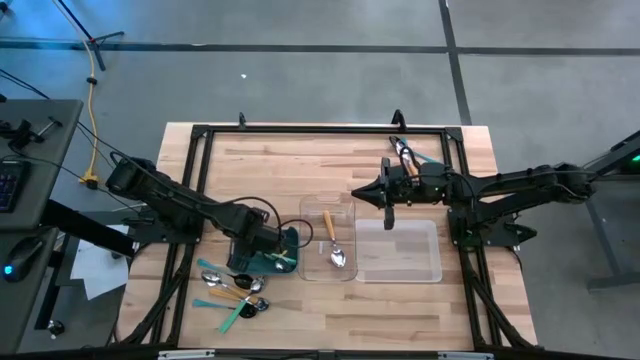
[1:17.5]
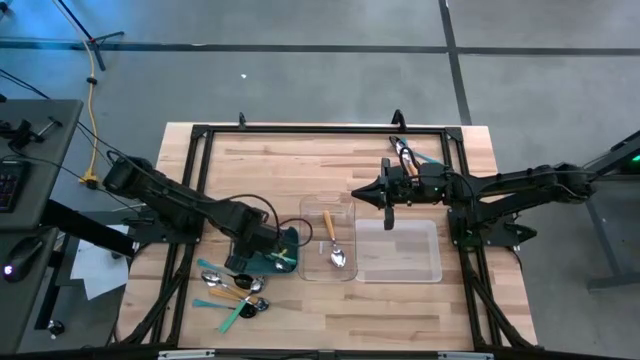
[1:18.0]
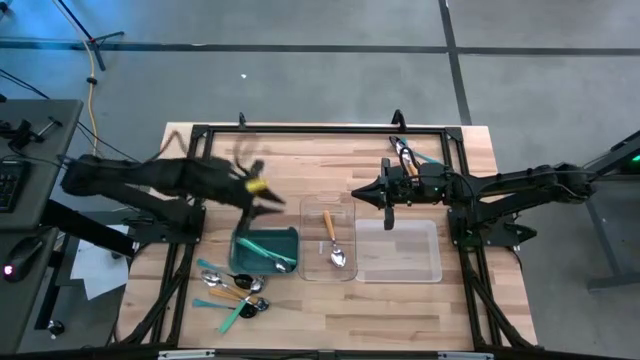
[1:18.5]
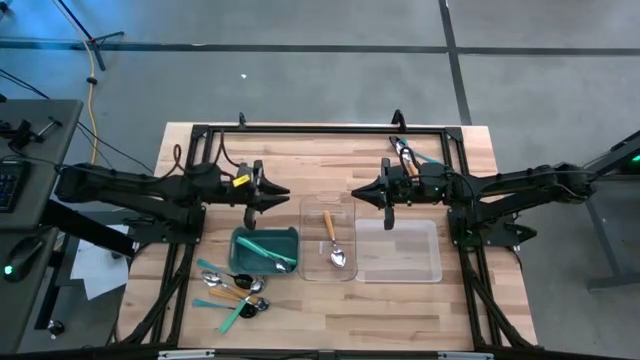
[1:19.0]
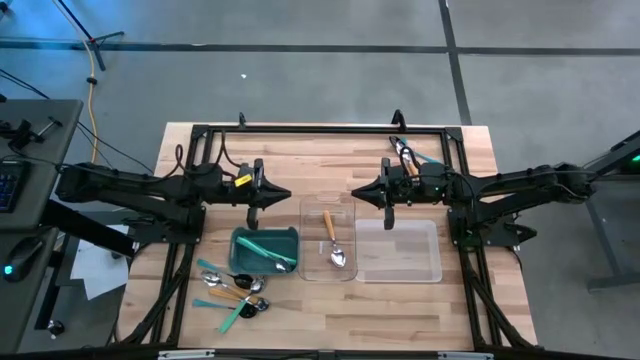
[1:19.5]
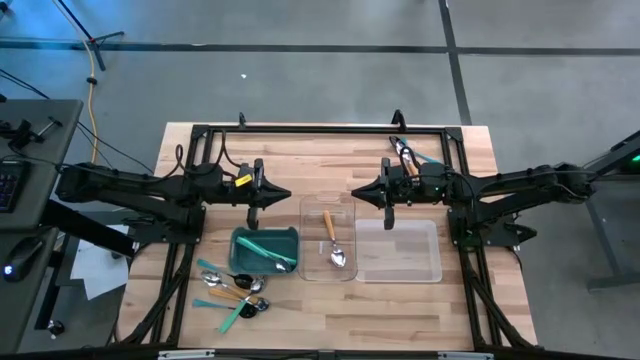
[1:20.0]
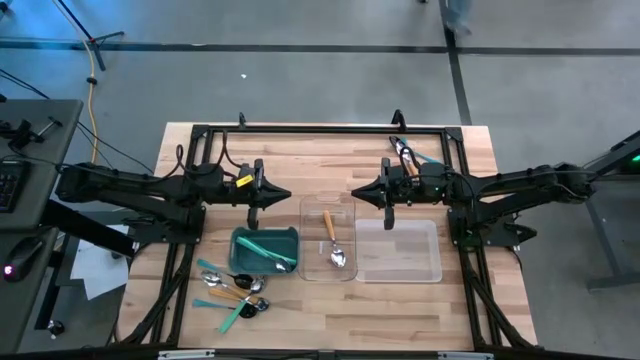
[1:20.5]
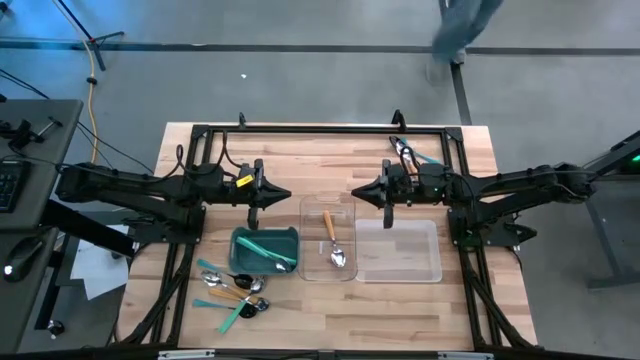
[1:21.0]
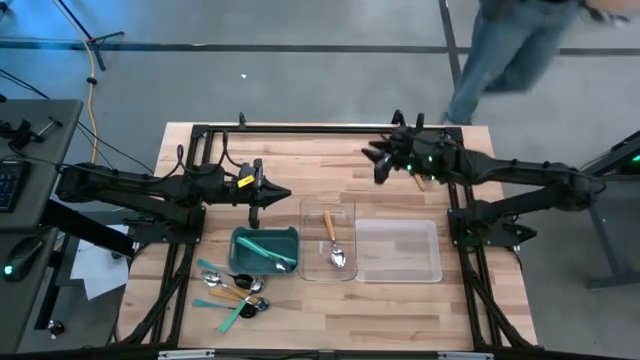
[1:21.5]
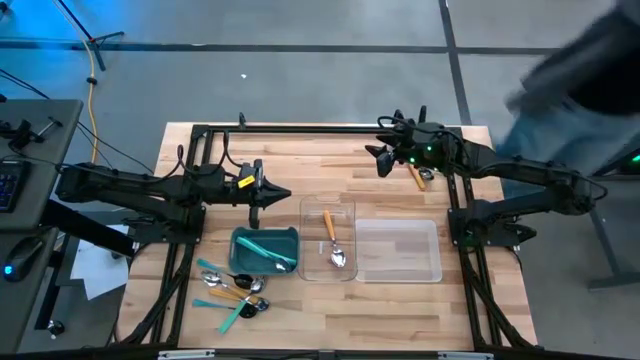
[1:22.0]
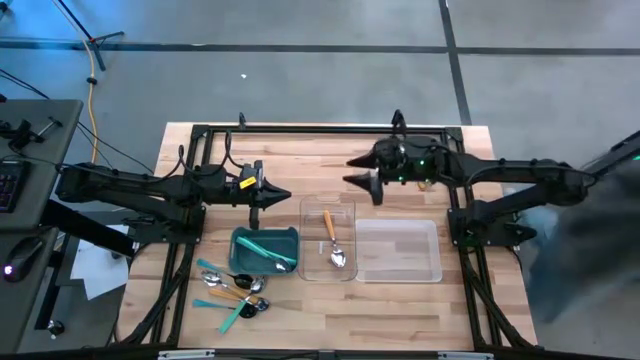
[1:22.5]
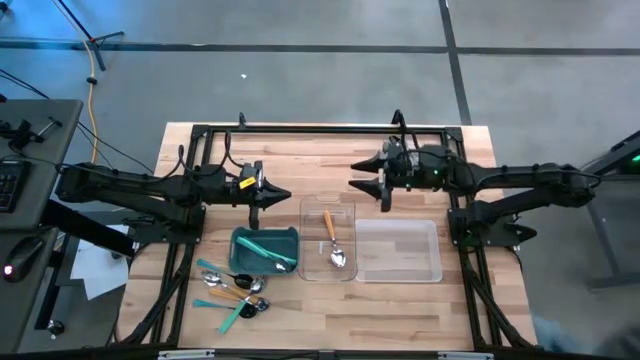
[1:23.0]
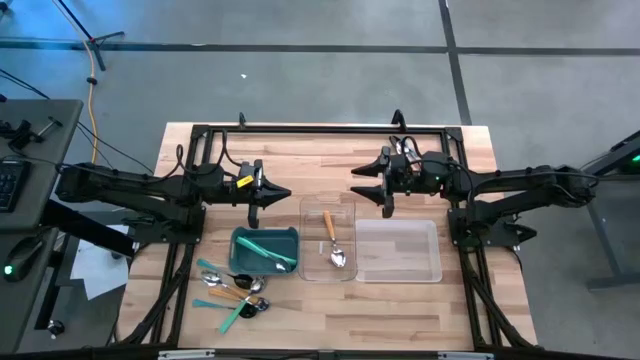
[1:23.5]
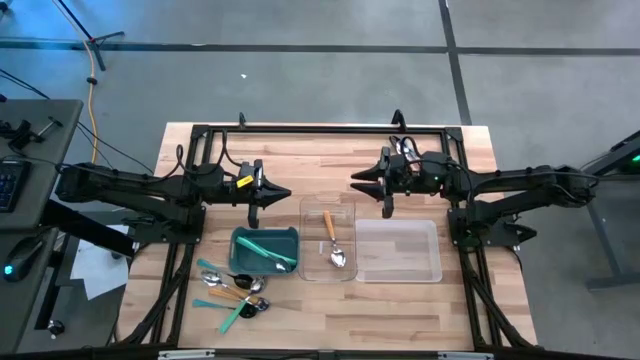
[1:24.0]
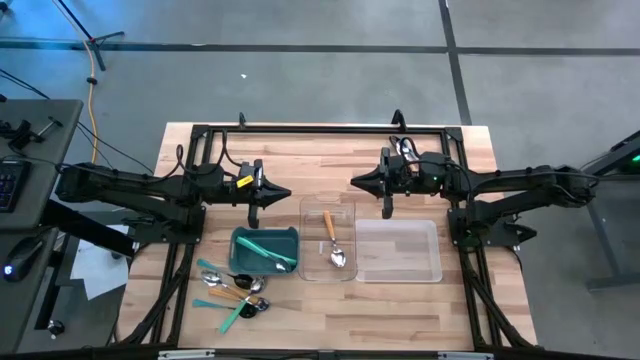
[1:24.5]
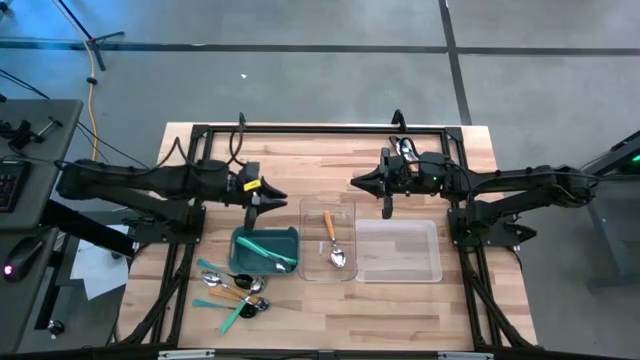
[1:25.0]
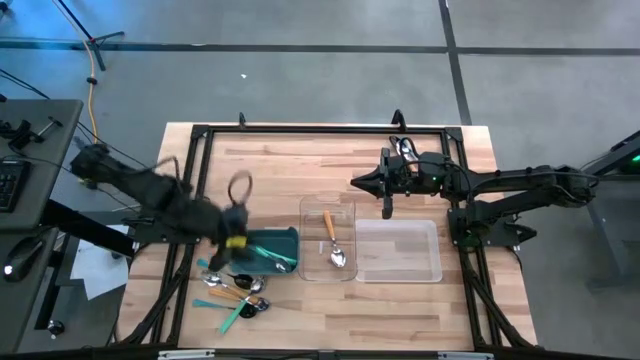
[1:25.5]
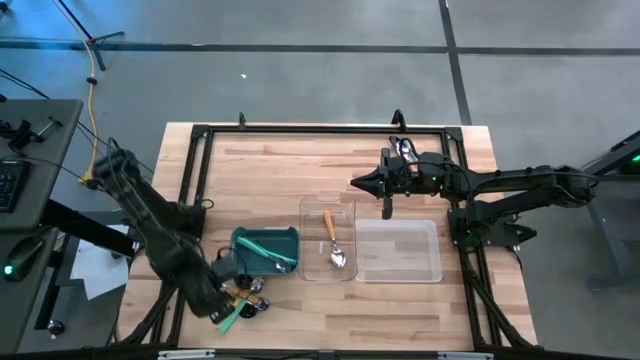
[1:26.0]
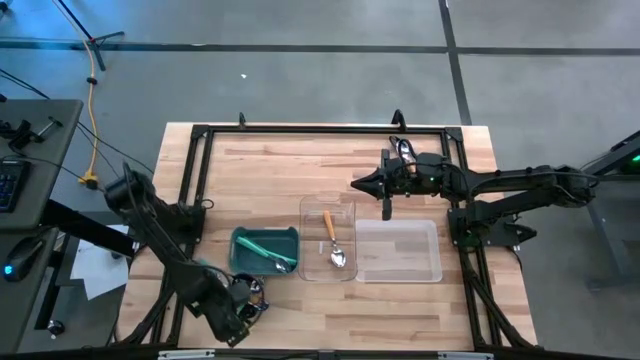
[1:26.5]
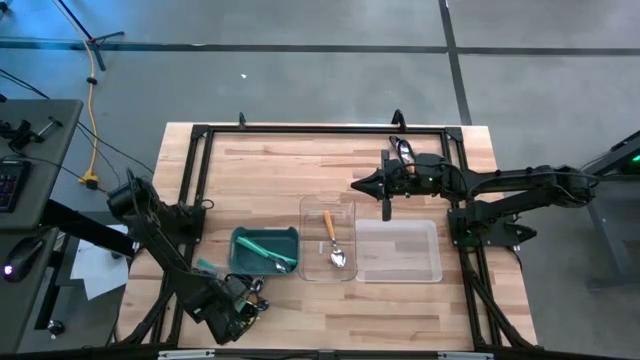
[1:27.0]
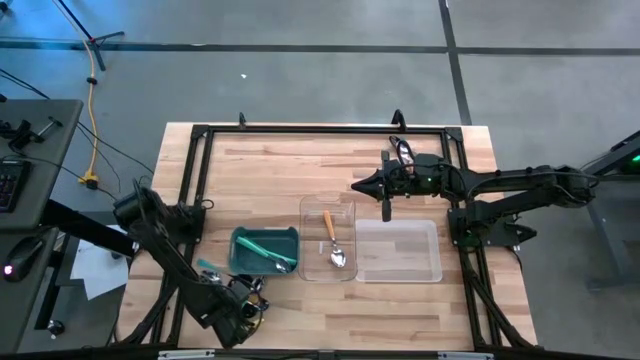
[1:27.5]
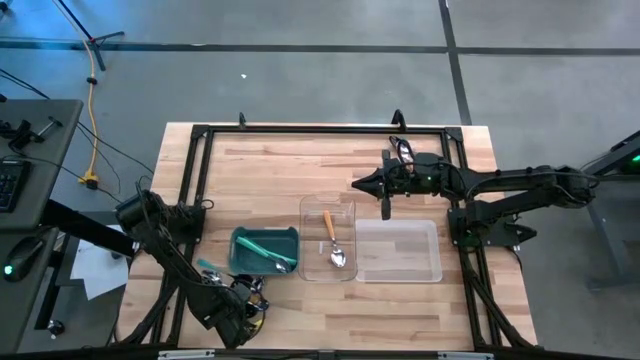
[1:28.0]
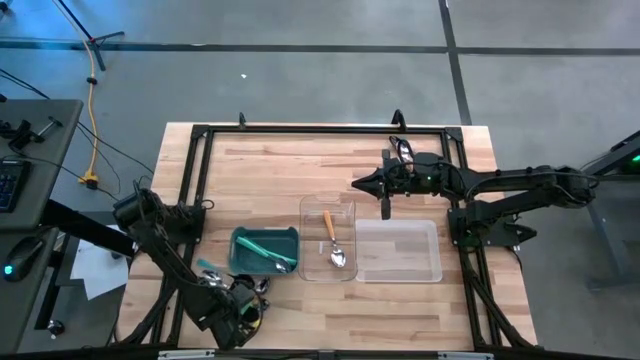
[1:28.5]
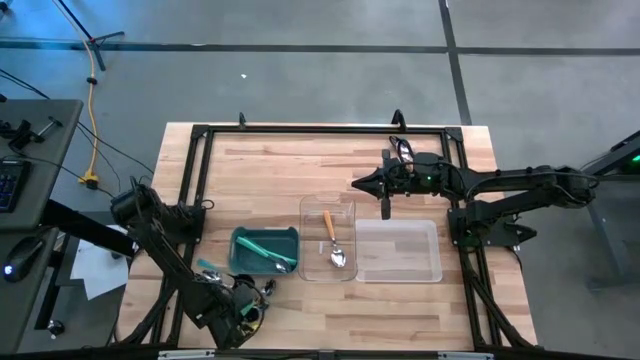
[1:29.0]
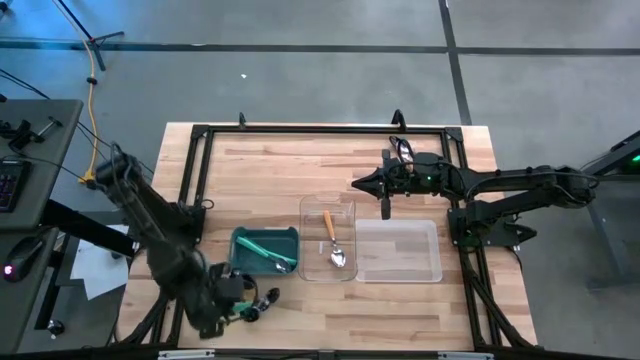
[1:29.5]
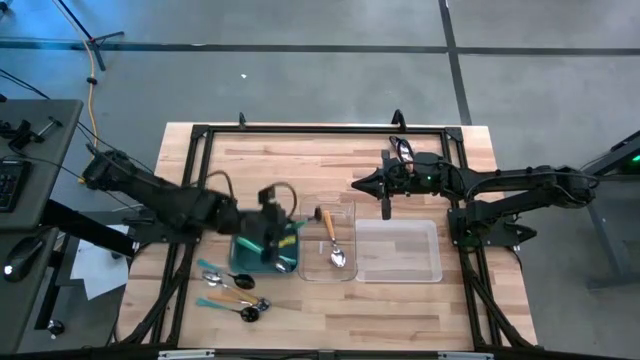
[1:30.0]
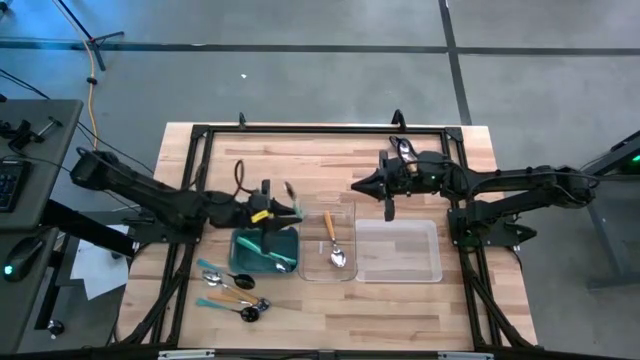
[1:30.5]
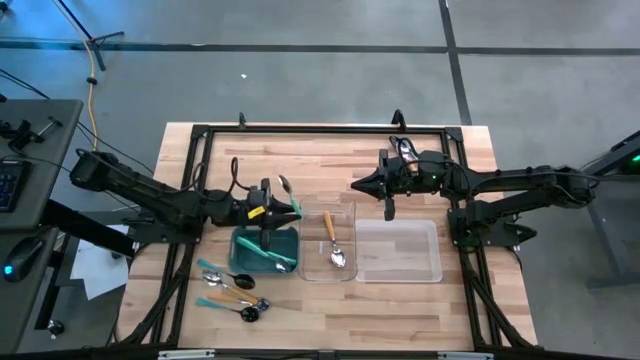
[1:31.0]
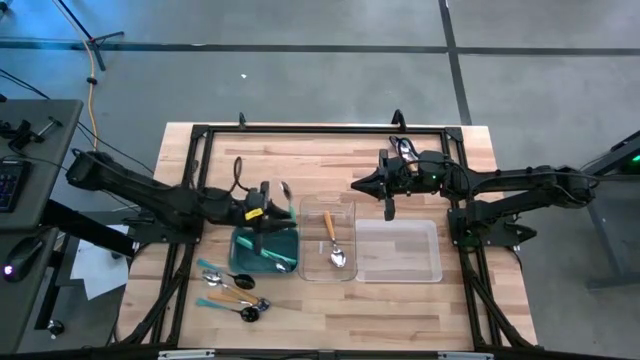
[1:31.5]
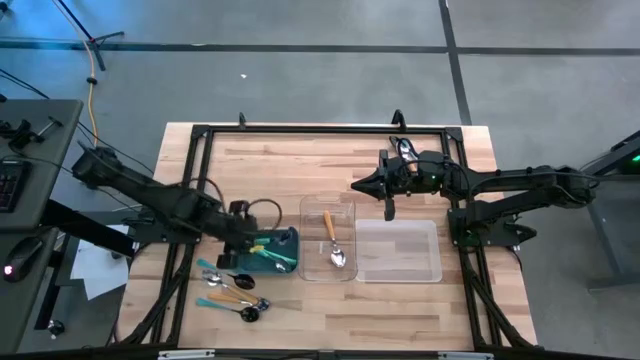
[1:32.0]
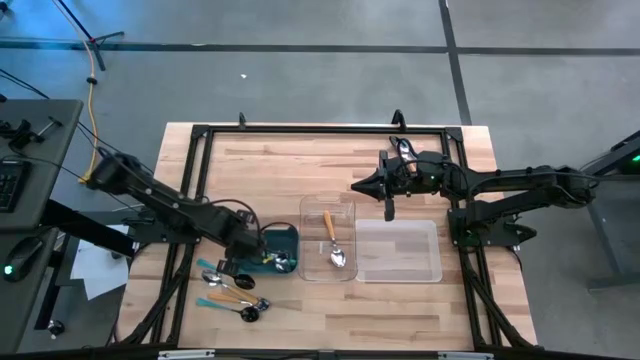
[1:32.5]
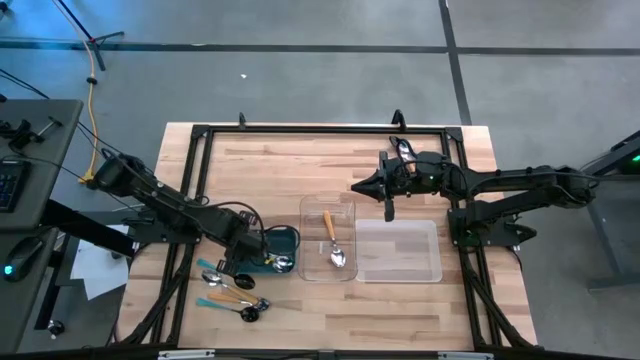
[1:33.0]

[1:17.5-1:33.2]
Task: Sort silverware by color (type)
Put the light blue spoon into the blue bin
